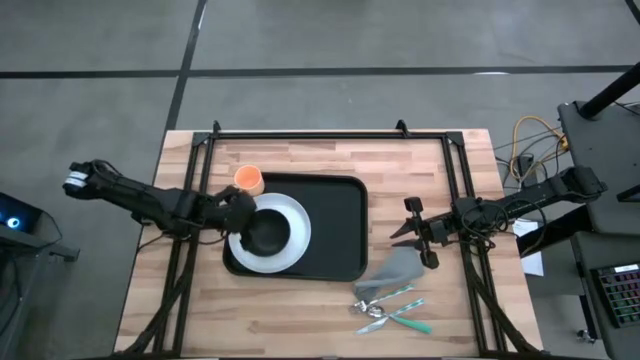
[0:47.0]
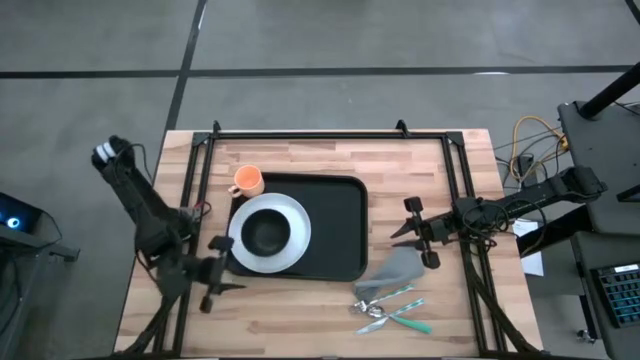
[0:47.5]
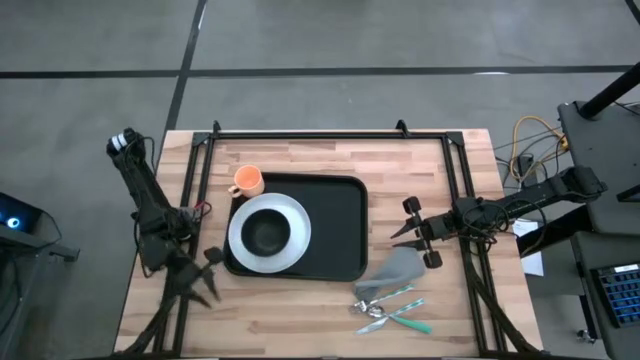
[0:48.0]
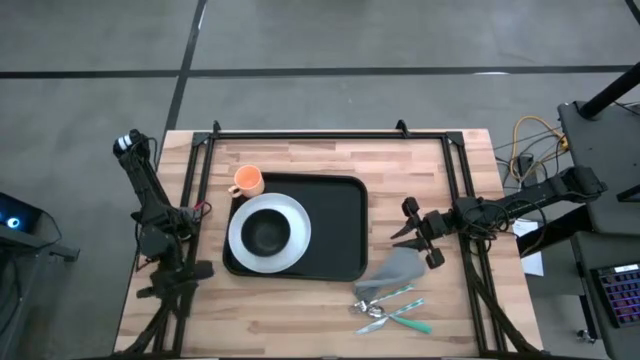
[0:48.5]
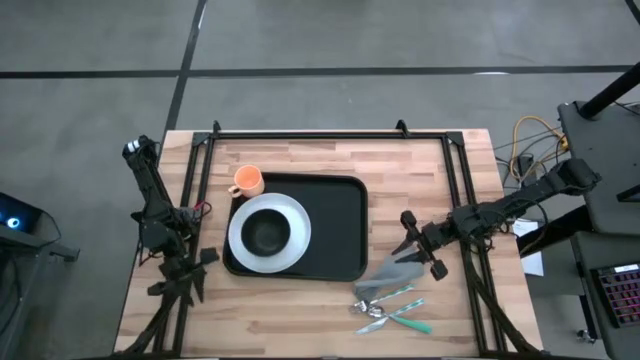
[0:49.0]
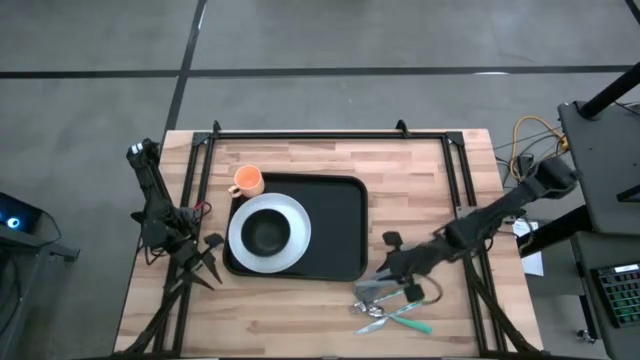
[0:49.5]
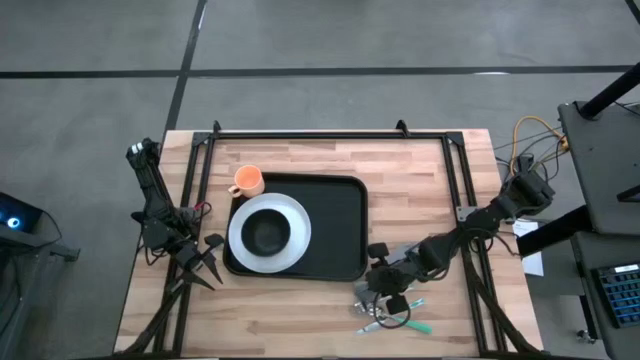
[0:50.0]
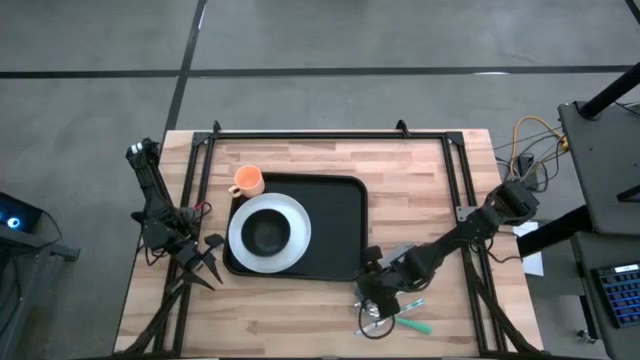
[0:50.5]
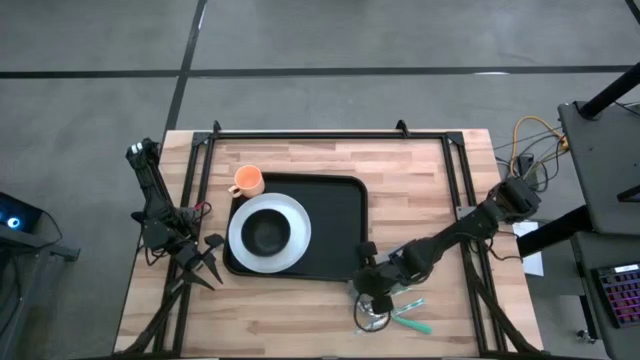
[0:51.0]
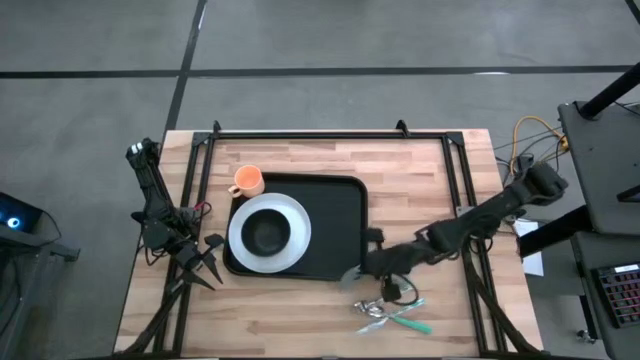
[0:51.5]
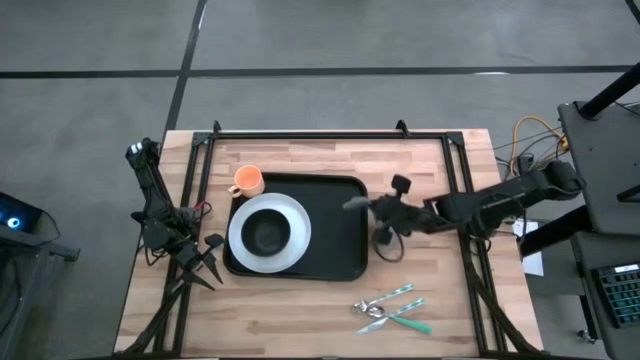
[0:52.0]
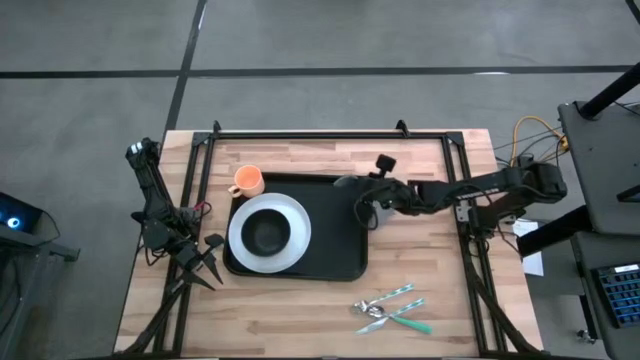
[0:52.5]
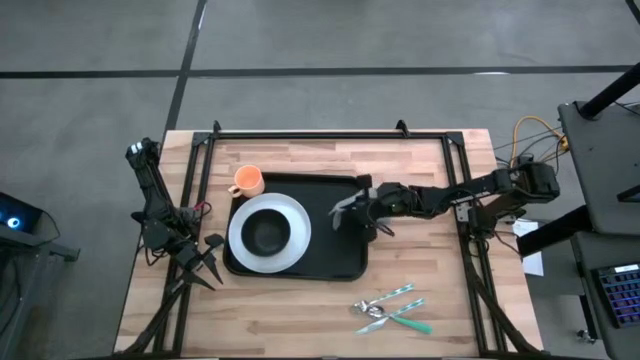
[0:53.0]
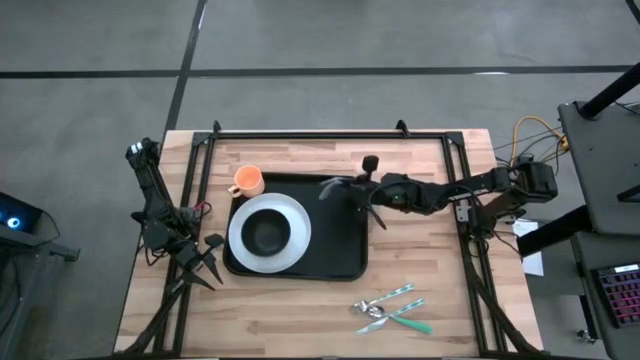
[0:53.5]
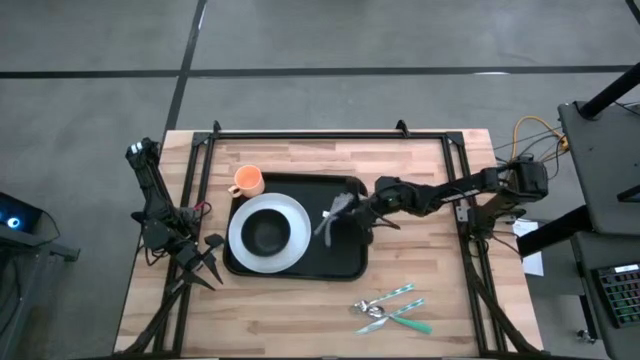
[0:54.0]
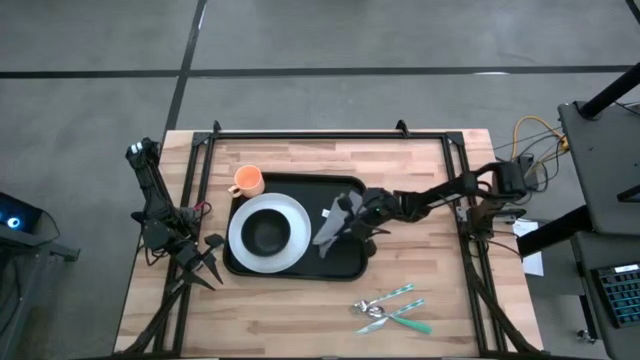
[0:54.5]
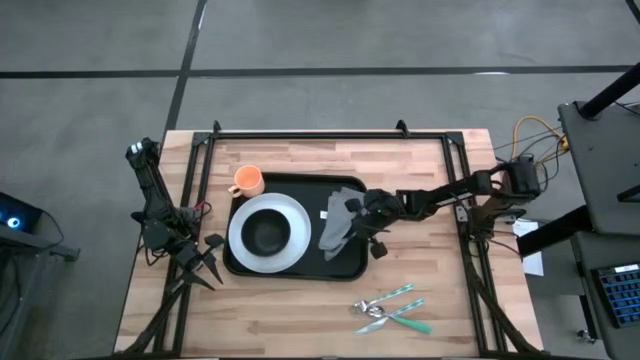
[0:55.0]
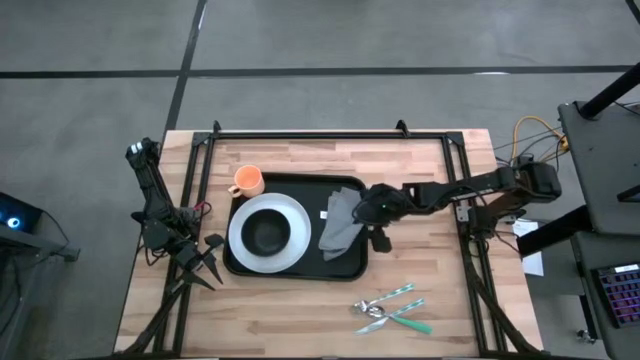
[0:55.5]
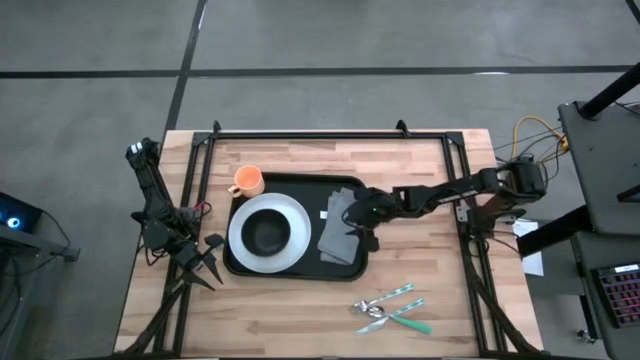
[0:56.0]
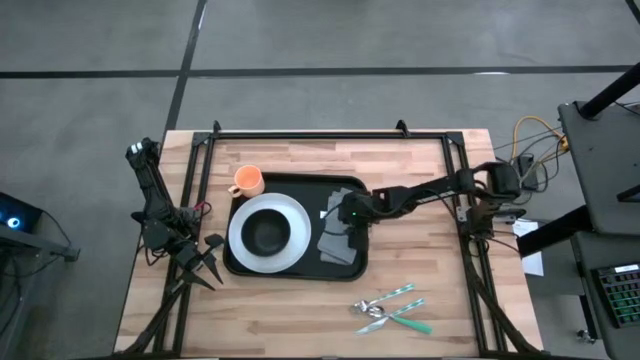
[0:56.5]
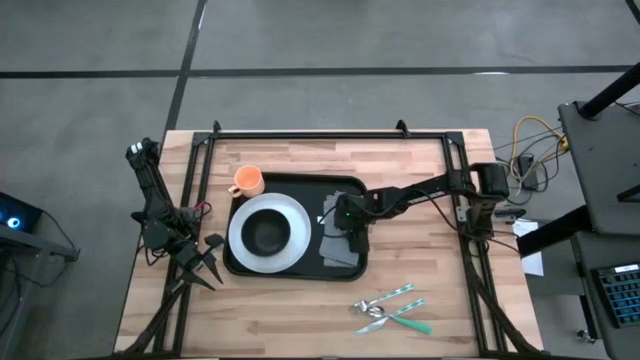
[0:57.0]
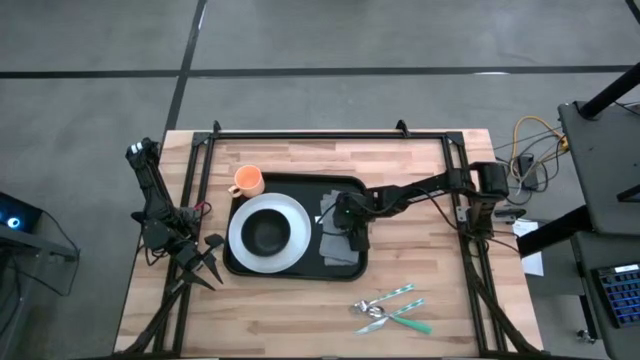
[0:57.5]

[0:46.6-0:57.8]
Task: Set up tray
Put the gray napkin beside the white plate on the black serving tray

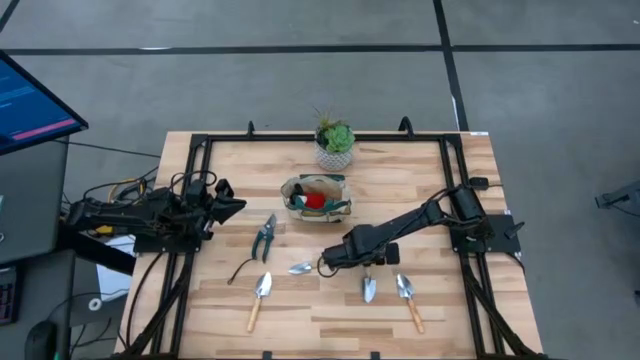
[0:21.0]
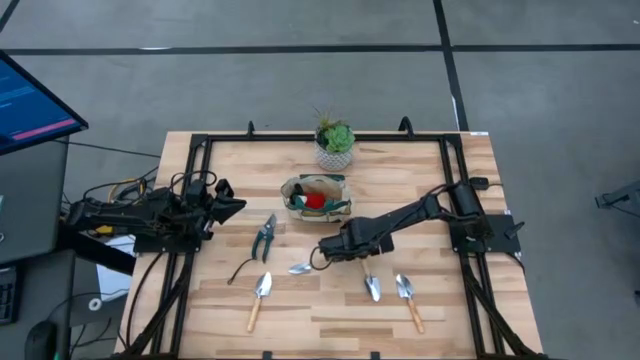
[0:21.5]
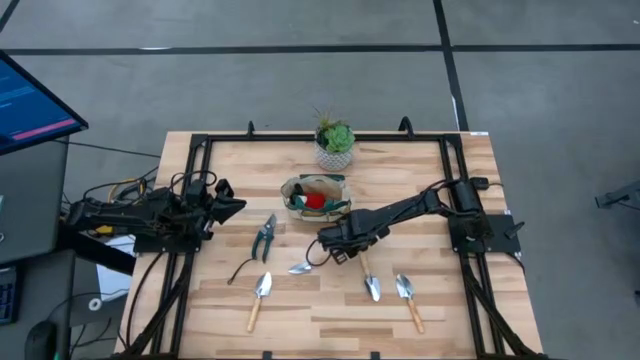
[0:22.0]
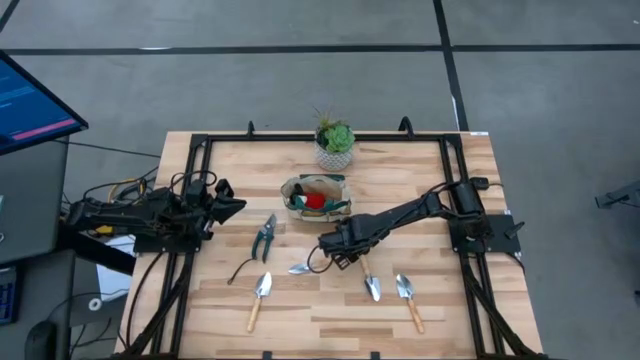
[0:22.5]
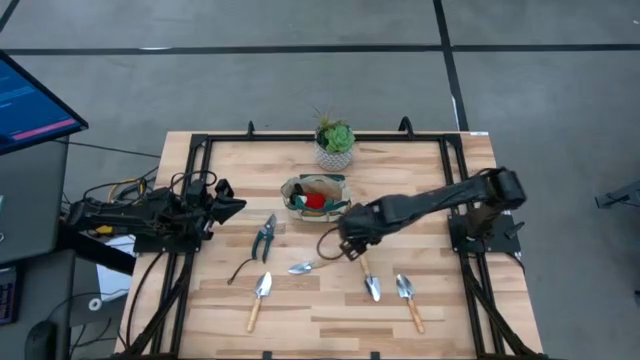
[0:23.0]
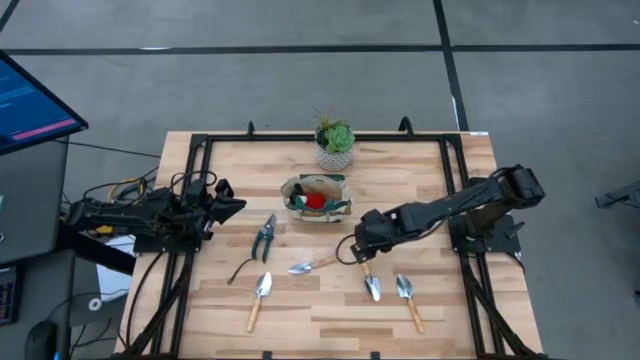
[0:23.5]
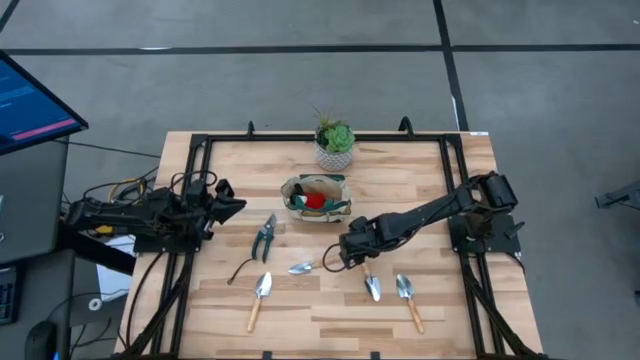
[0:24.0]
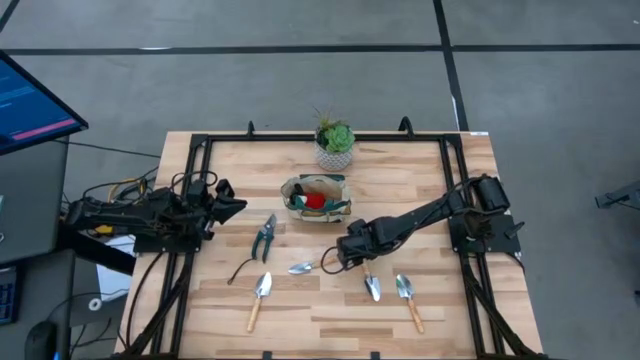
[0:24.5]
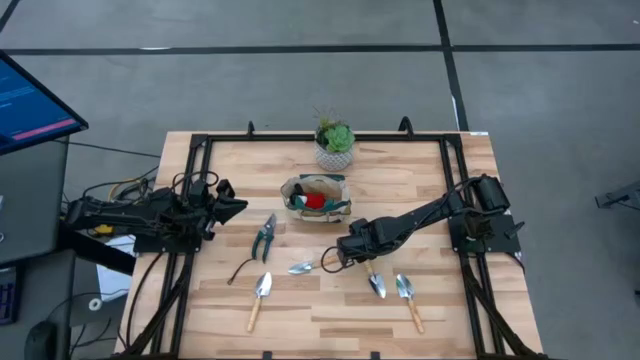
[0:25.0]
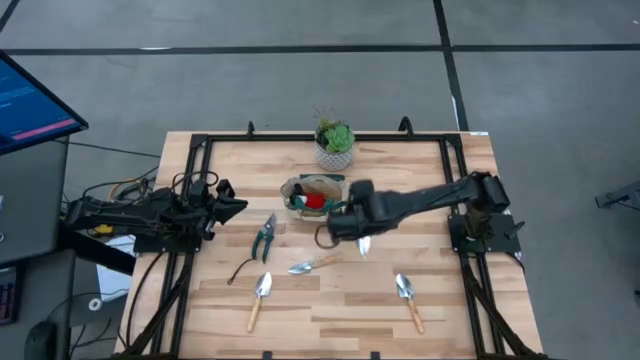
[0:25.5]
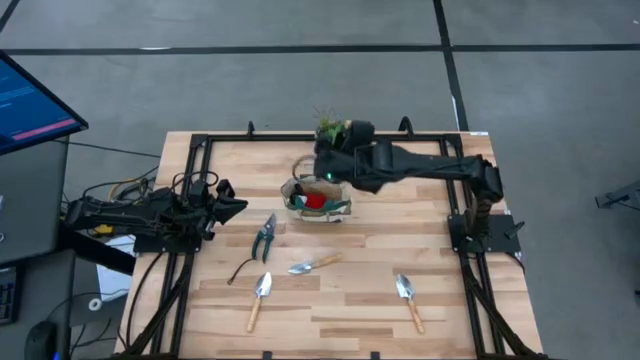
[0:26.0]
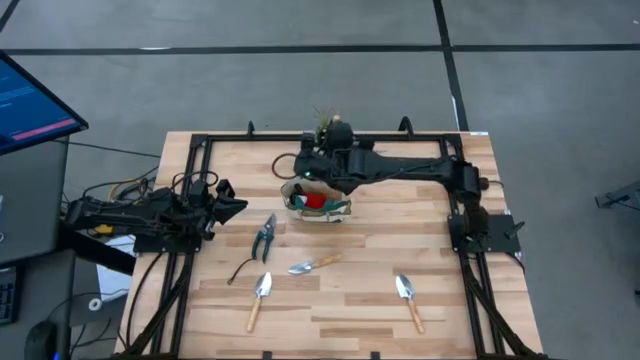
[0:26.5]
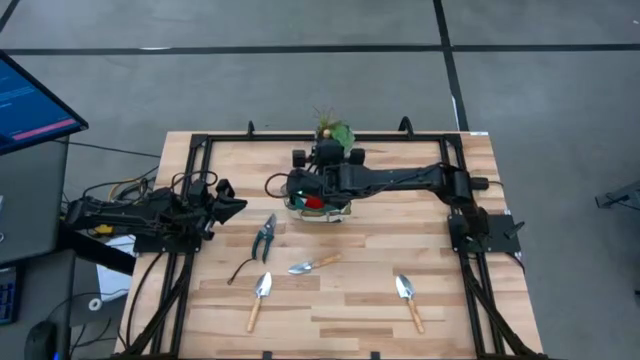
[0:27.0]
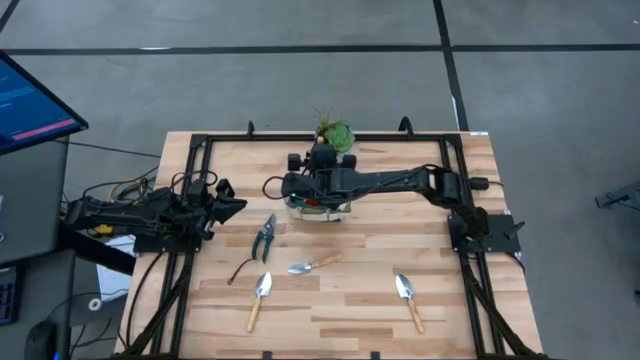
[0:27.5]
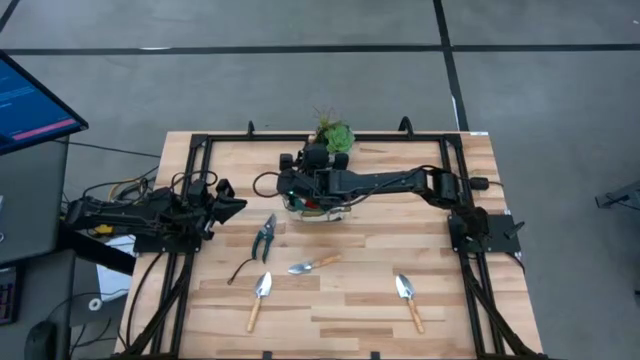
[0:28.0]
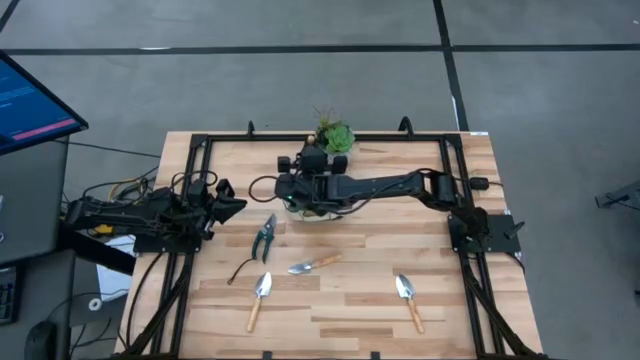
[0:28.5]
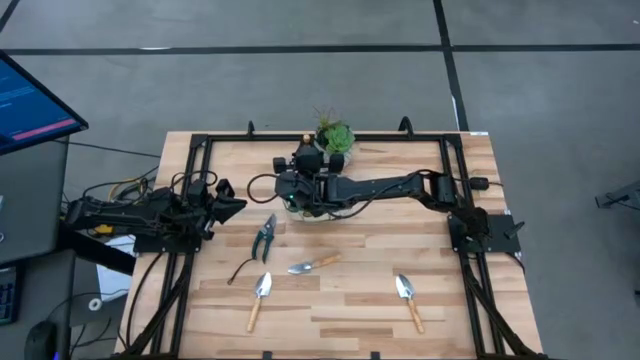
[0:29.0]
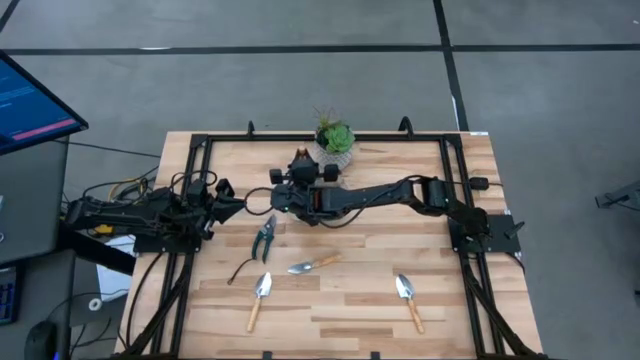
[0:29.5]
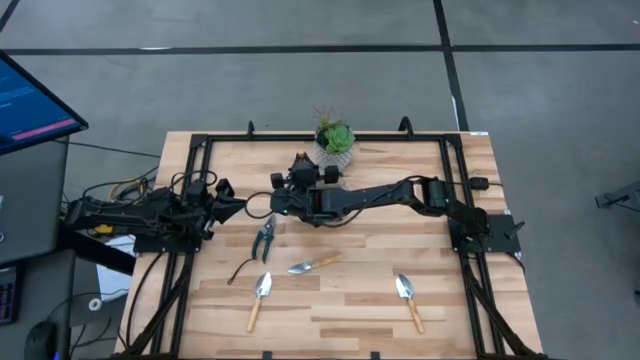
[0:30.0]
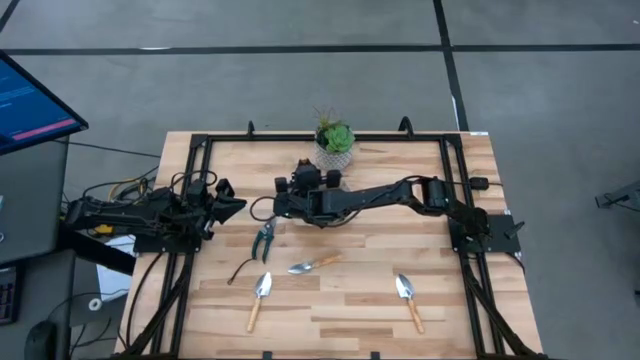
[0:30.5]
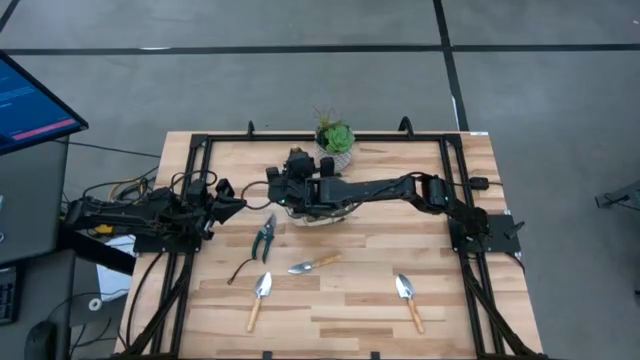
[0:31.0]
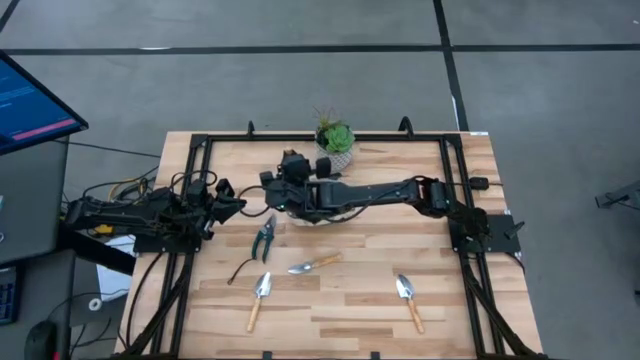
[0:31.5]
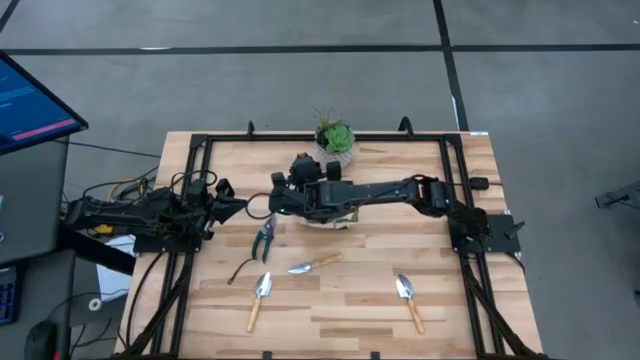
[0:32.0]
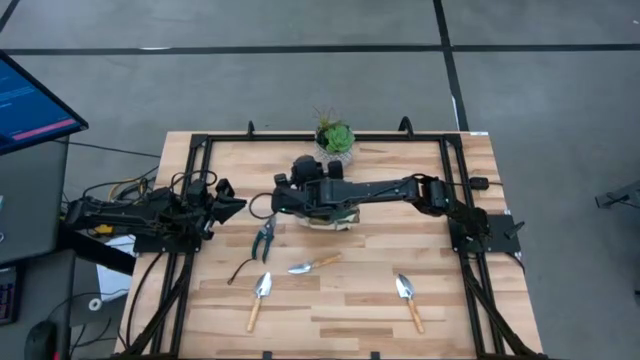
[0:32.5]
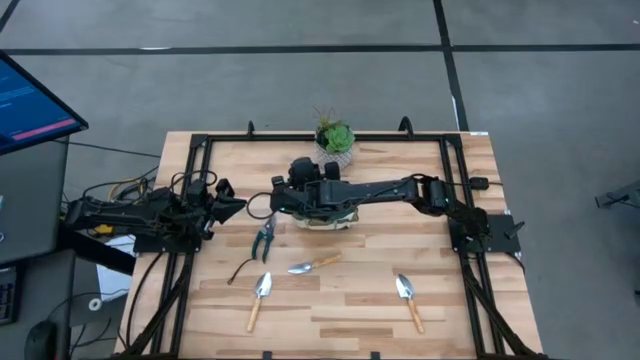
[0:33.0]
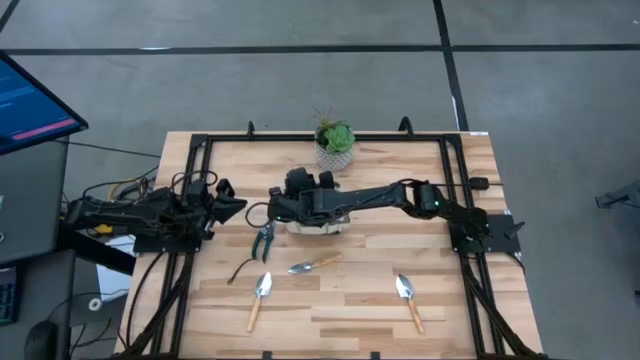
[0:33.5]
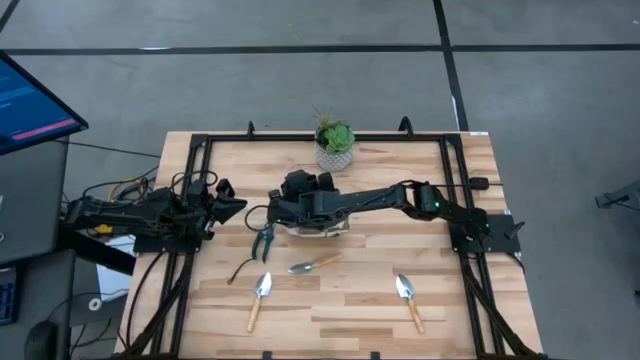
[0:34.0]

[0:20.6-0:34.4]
Task: Pick & Place Garden tools in Gardening bag
Put the top right trowel into the gardening bag
